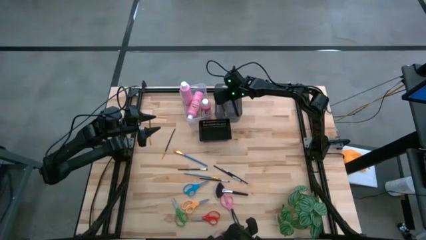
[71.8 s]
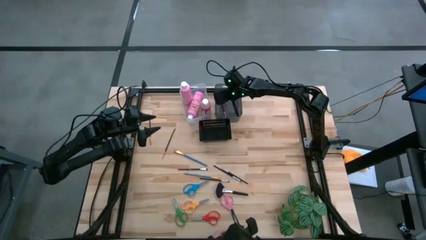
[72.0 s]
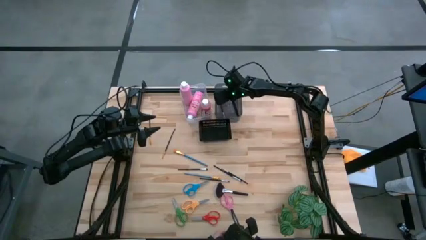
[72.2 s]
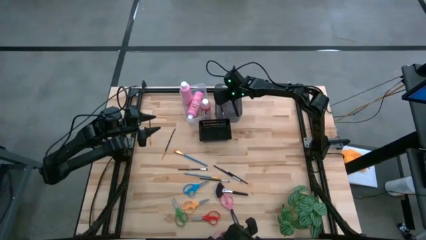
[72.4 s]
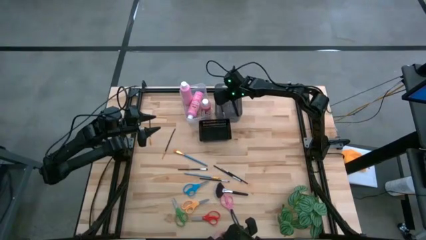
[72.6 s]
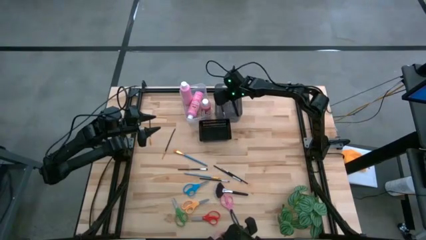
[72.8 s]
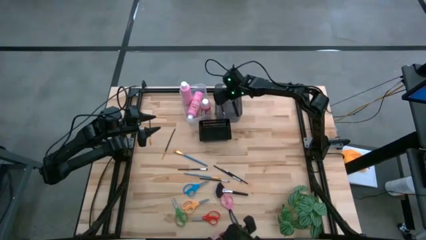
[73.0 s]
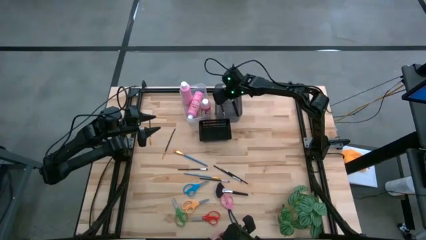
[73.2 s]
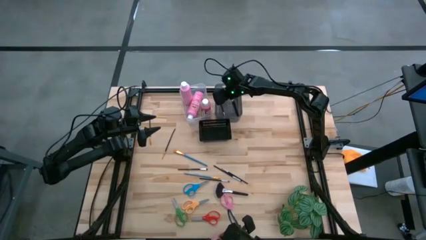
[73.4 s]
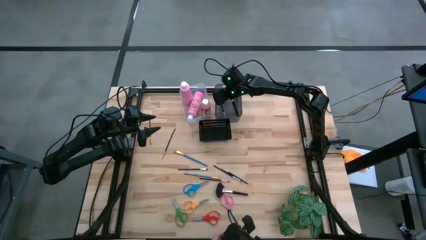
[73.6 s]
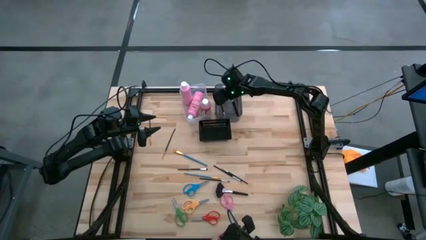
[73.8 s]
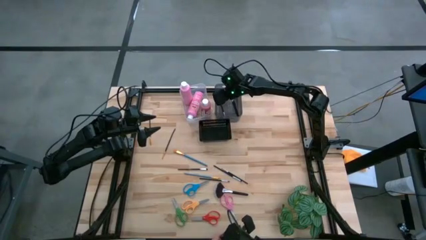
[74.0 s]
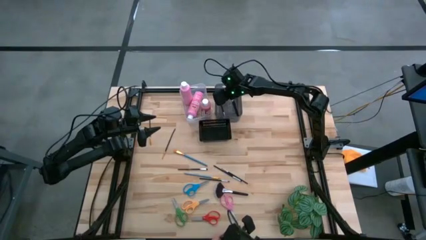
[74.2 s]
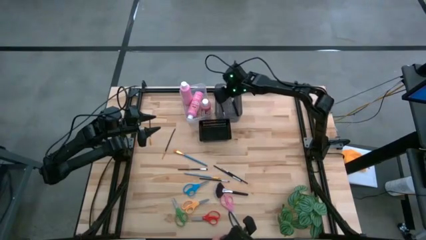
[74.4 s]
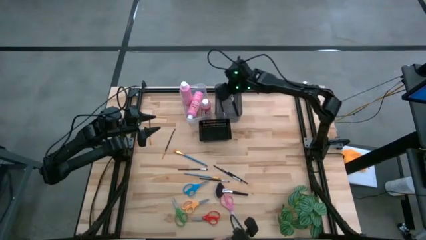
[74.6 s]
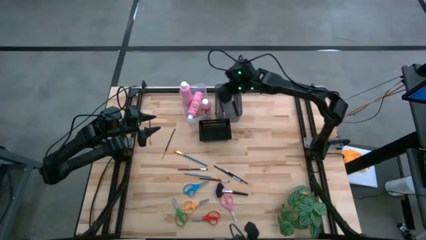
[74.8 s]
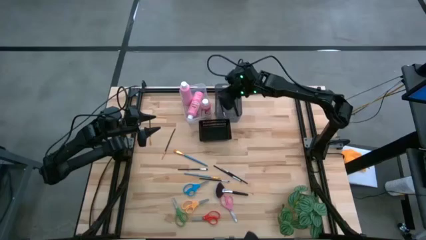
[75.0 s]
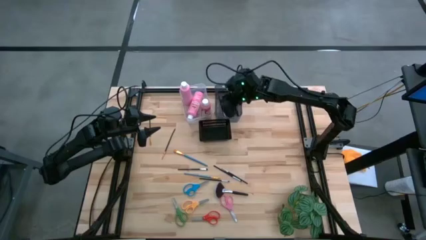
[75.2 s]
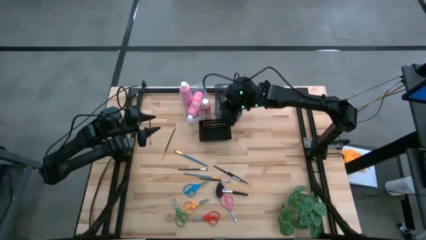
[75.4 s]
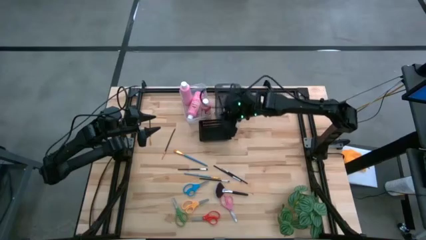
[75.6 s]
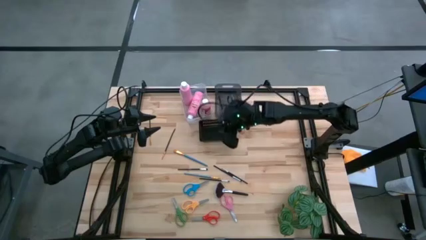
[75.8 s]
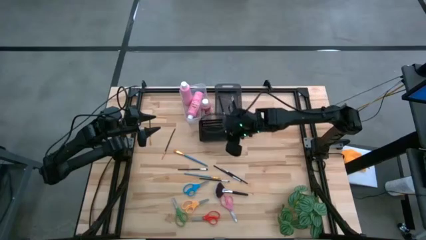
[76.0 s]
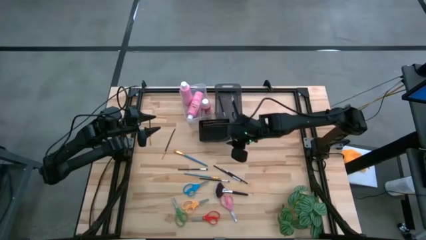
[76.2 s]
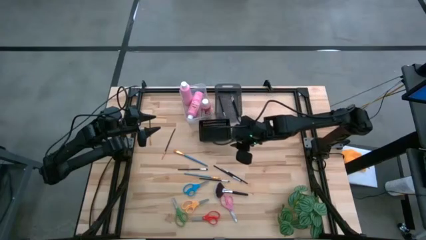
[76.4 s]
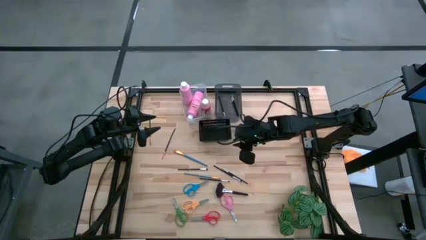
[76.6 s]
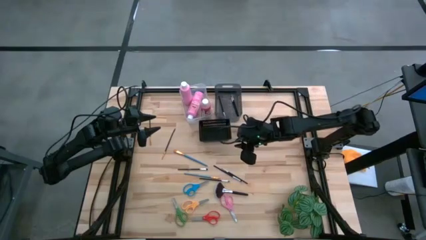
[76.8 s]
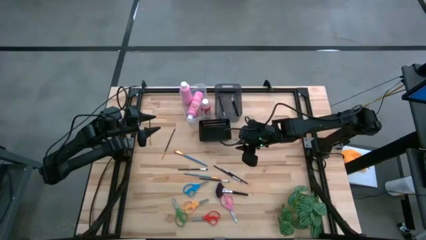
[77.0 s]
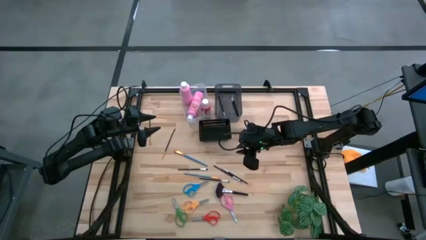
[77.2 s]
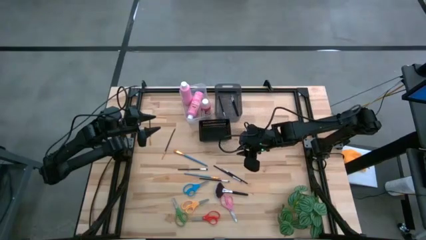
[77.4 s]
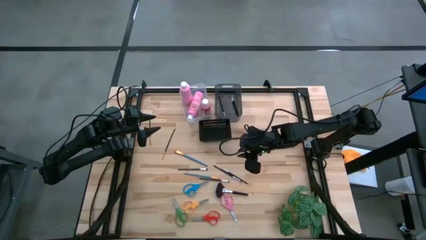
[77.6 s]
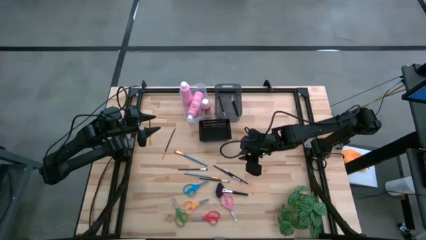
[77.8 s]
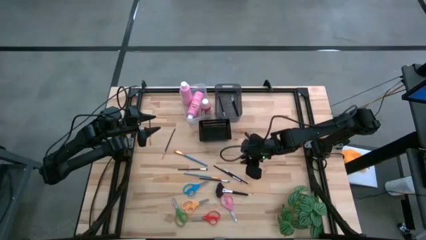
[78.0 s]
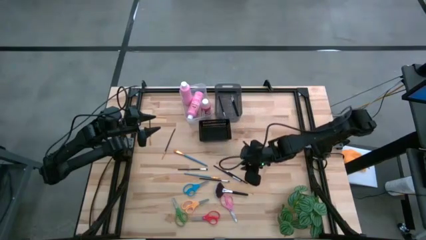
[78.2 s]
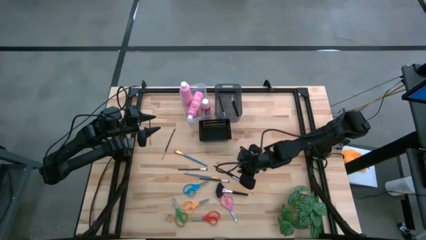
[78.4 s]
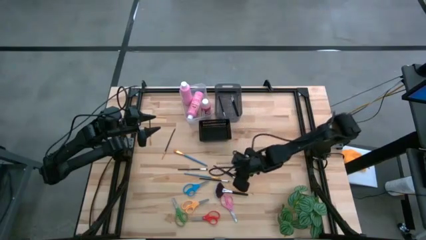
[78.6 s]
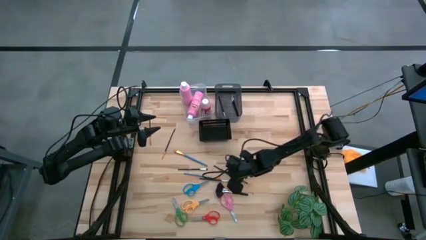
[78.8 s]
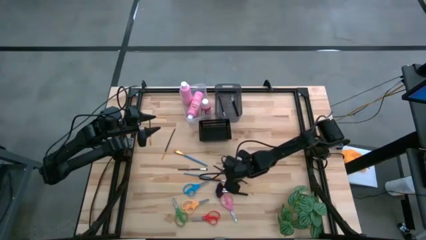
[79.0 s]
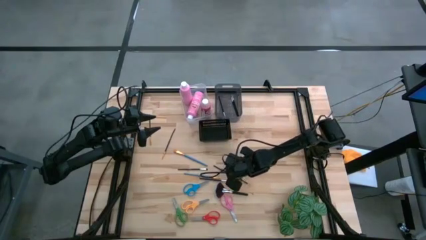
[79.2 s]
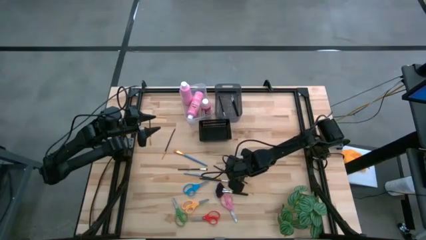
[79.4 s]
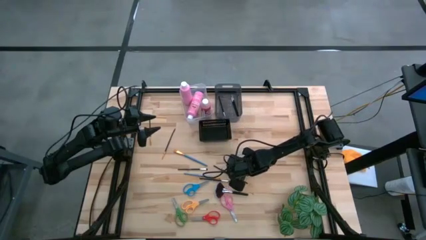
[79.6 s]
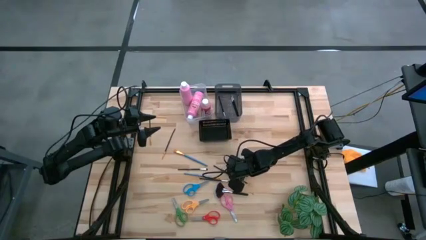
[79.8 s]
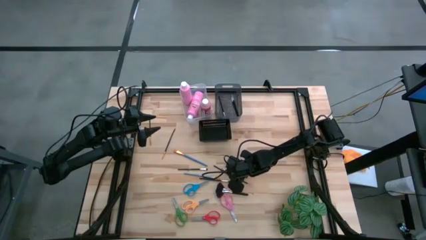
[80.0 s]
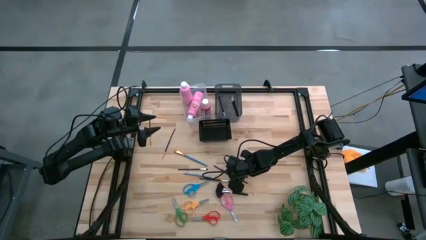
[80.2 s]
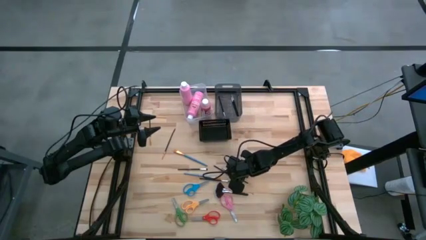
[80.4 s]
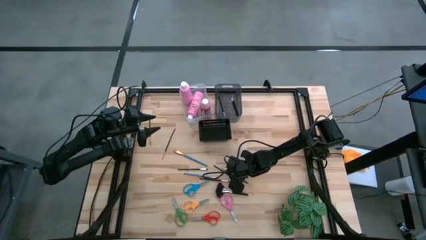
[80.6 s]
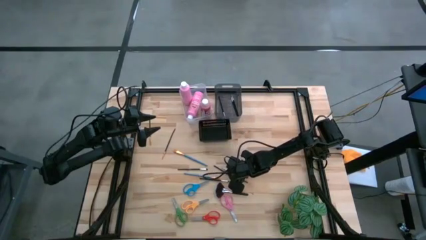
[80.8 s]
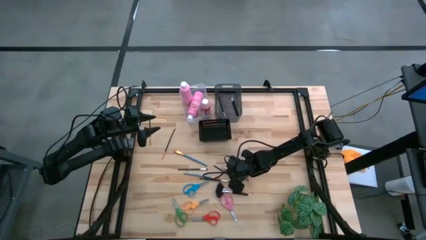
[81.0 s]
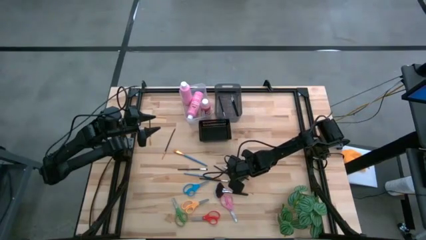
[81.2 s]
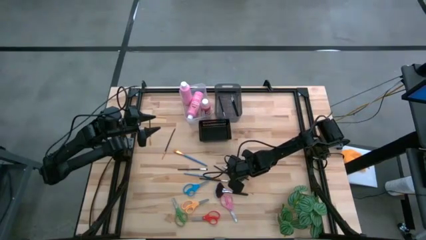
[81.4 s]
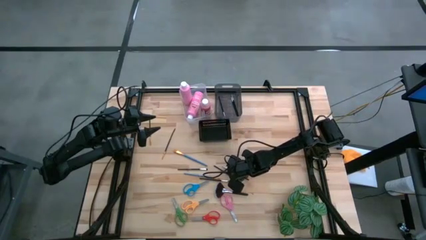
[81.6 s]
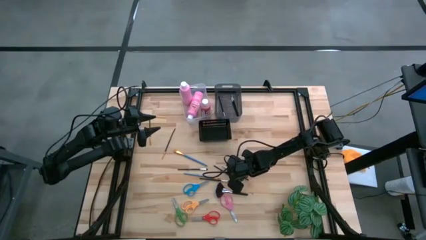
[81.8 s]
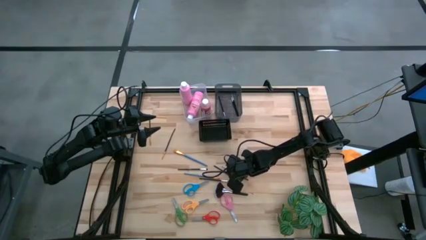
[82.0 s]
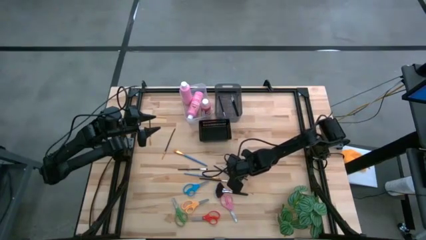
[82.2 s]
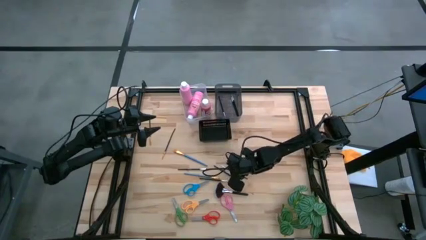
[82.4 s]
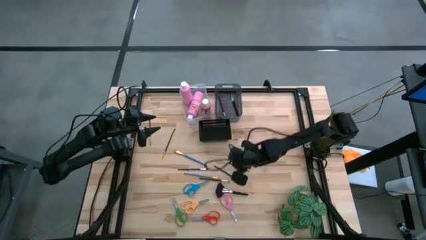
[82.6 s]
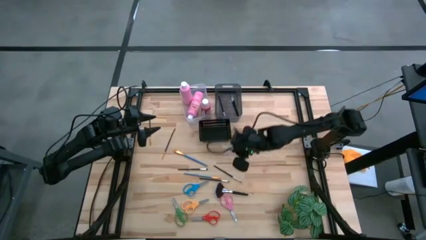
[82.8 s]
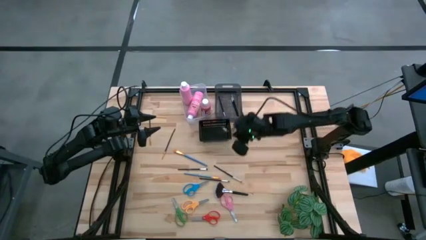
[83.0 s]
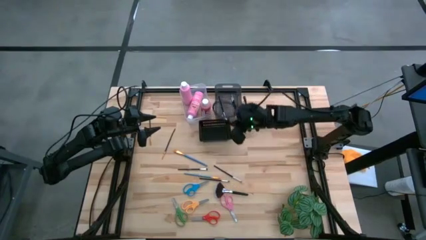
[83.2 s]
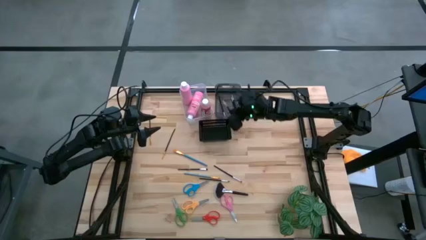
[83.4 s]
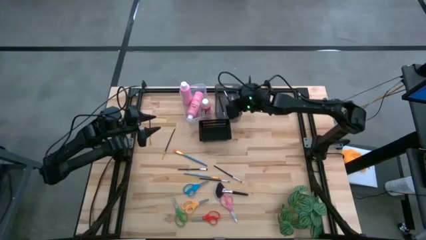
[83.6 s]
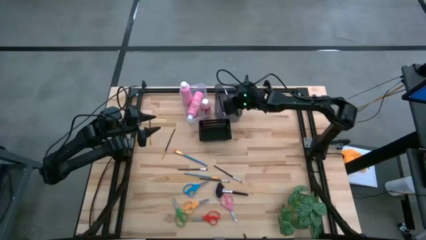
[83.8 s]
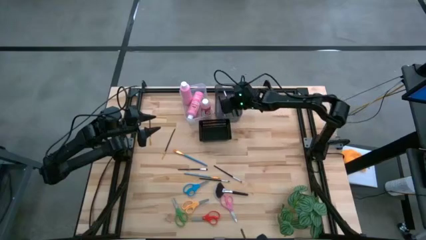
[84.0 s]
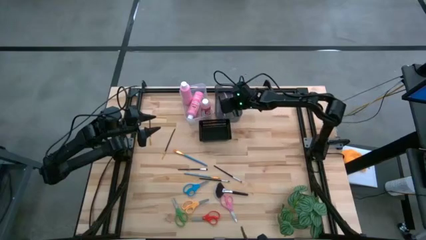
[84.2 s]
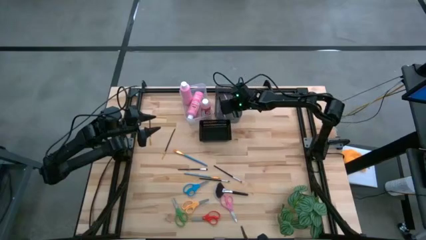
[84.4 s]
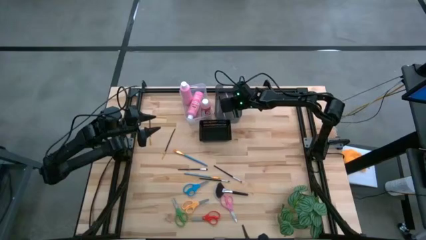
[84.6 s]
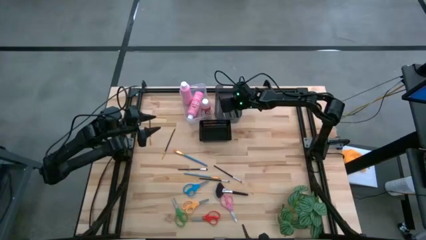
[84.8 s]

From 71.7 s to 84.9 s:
Task: Pick & Place Paint Supplies
Put the black paint brush into the gray bin

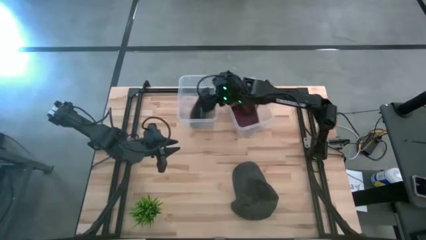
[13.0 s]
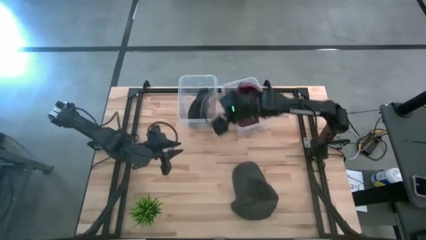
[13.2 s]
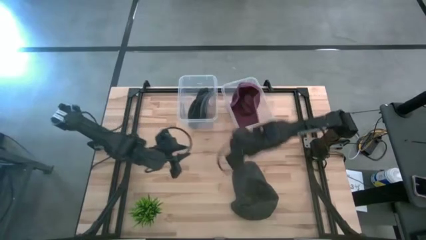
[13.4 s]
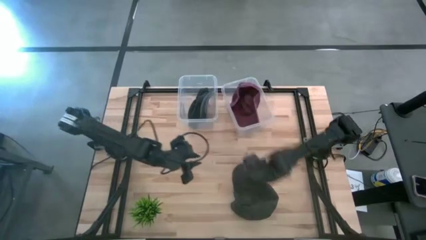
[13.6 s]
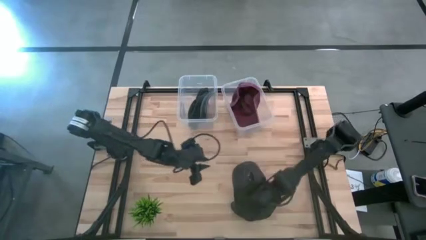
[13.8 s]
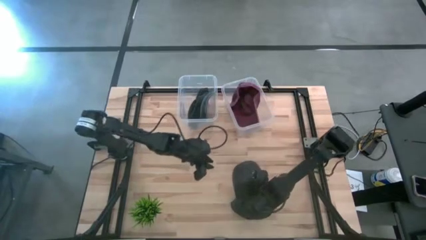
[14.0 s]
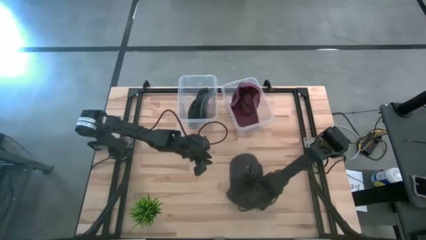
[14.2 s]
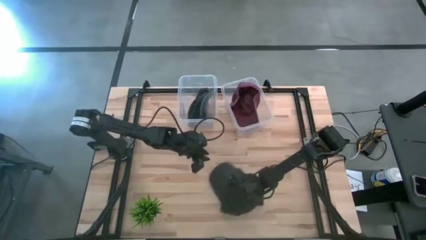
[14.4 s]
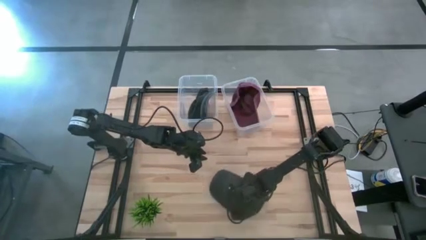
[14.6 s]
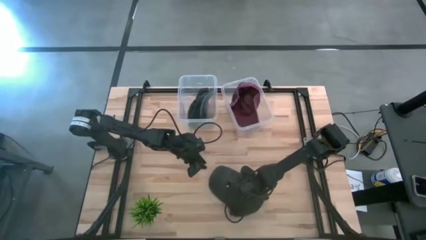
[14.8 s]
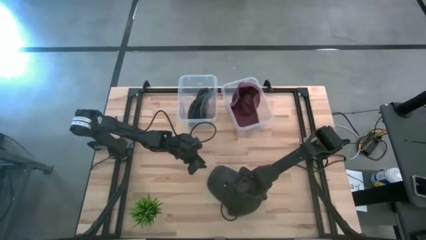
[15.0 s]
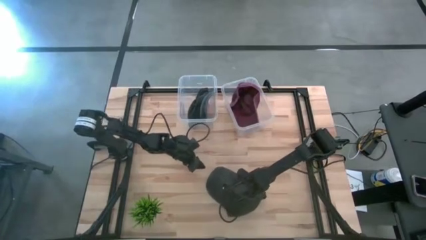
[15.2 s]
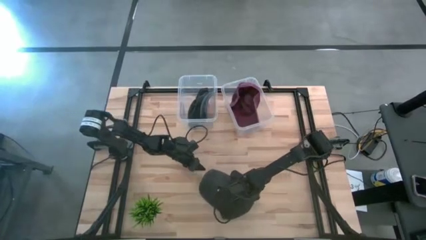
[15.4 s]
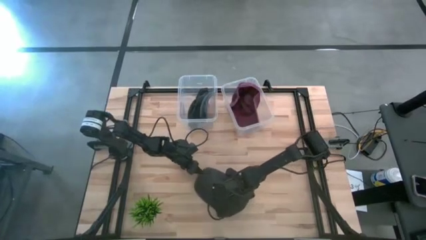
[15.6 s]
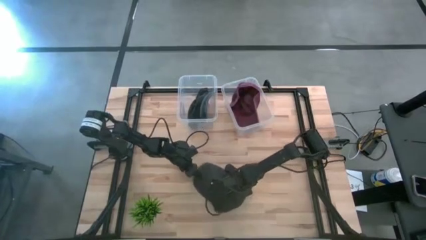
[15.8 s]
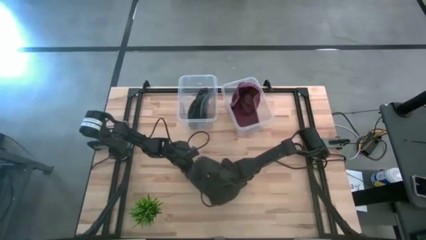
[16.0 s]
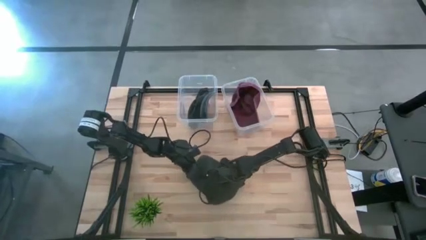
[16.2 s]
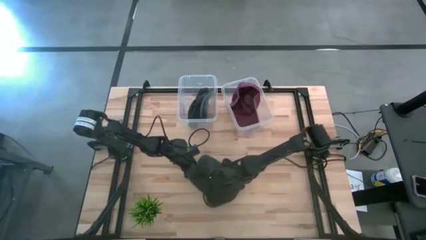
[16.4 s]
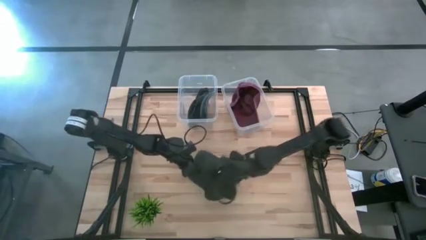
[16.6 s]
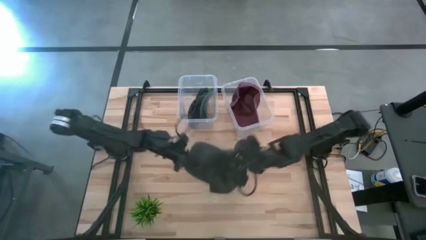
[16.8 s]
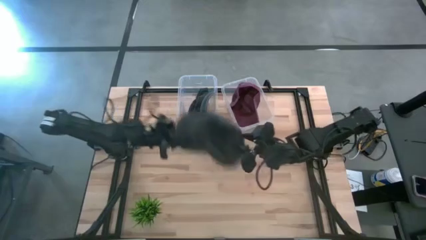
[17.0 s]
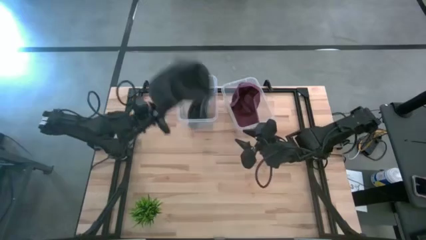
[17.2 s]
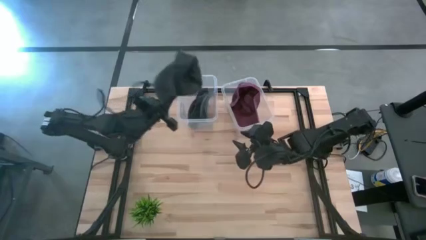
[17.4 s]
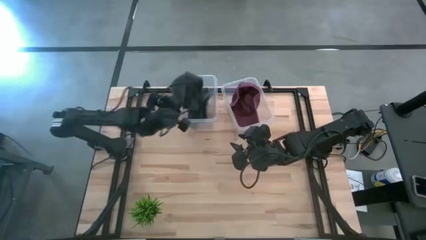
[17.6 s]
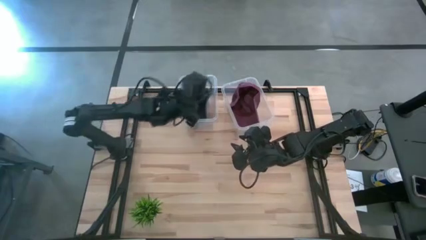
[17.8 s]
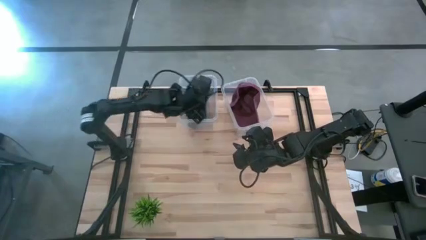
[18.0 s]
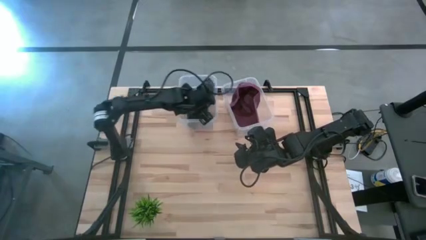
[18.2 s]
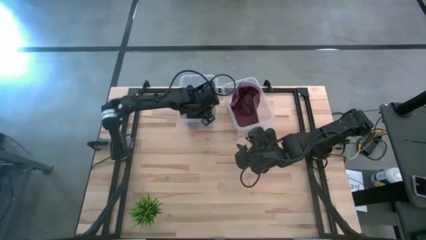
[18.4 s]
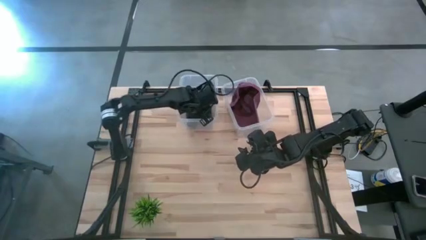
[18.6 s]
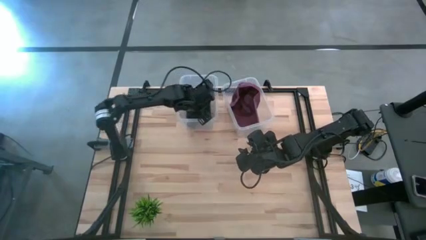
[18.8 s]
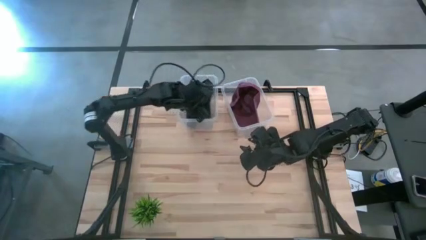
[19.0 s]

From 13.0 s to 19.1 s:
Task: Pick & Place hat
Put the black cap into the left transparent bin
